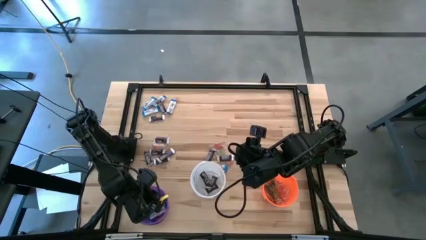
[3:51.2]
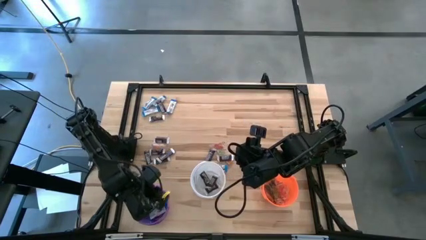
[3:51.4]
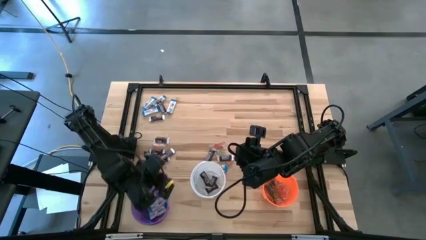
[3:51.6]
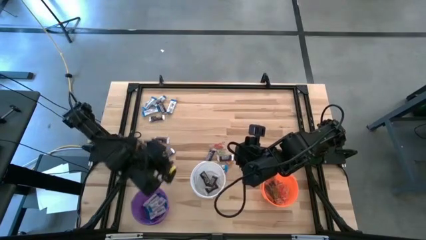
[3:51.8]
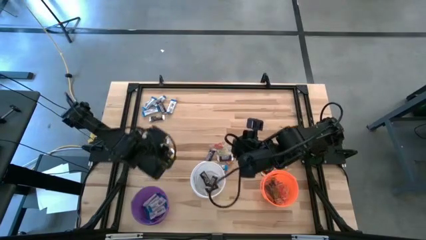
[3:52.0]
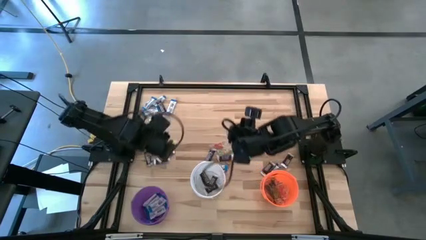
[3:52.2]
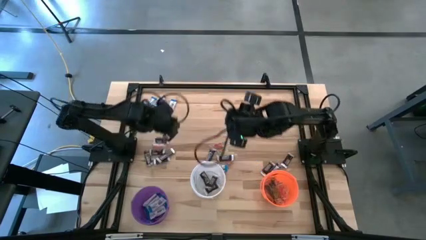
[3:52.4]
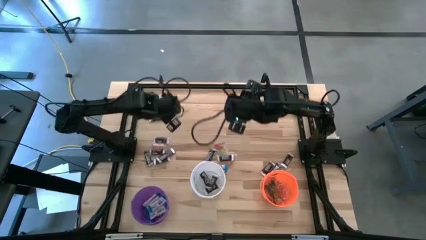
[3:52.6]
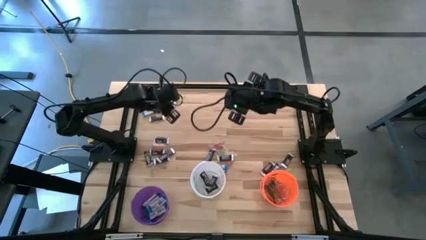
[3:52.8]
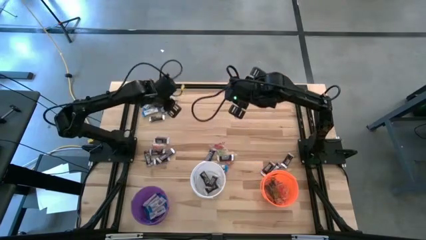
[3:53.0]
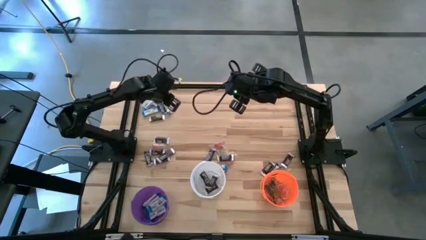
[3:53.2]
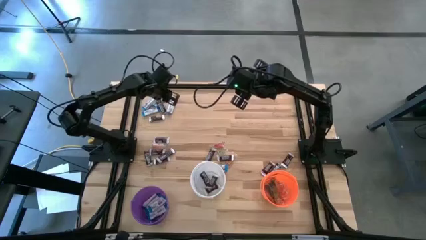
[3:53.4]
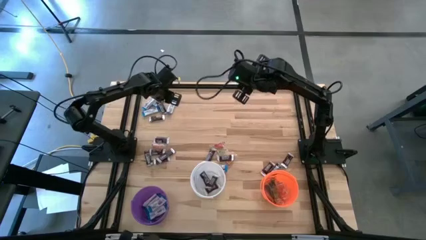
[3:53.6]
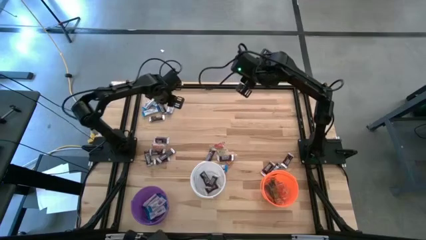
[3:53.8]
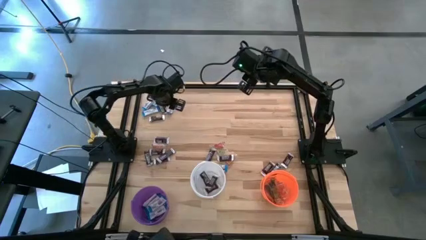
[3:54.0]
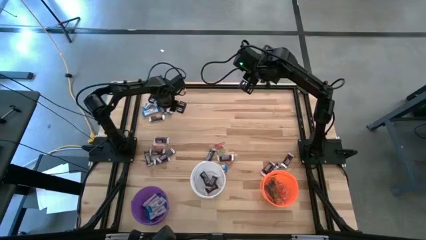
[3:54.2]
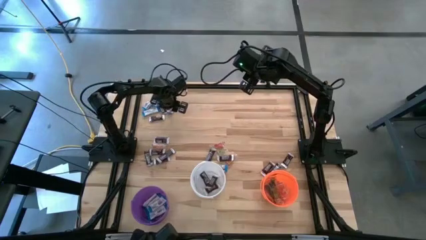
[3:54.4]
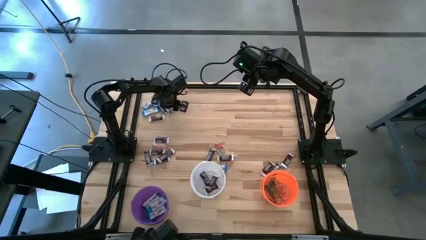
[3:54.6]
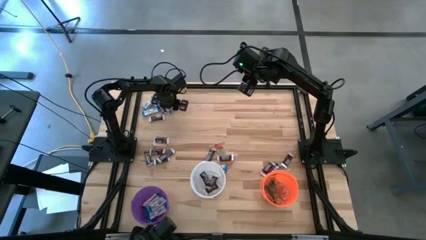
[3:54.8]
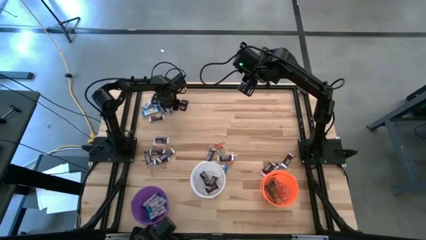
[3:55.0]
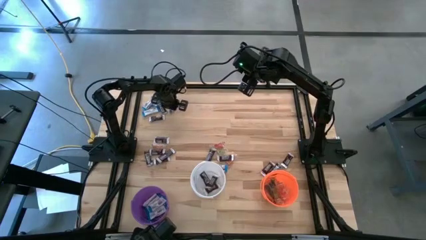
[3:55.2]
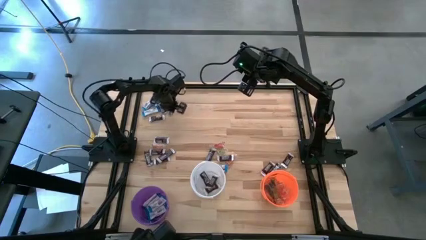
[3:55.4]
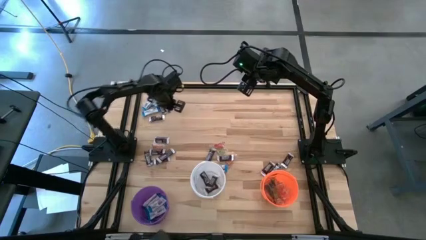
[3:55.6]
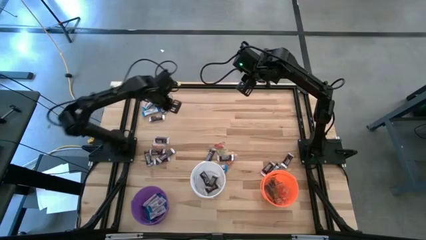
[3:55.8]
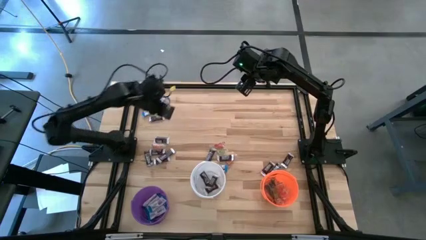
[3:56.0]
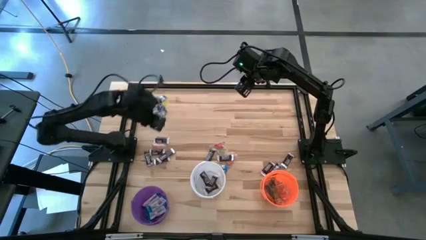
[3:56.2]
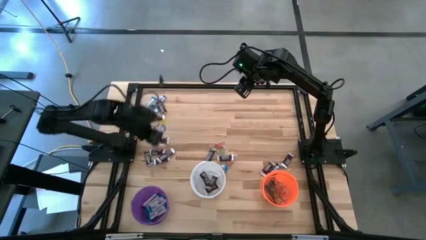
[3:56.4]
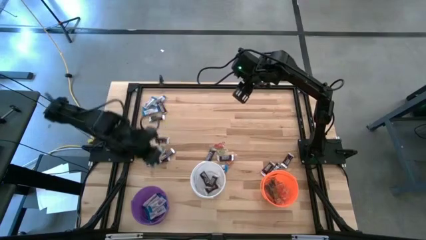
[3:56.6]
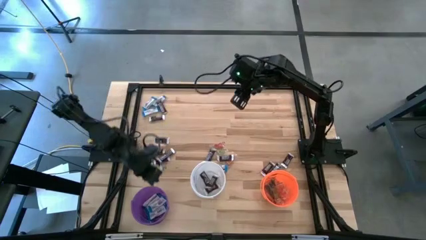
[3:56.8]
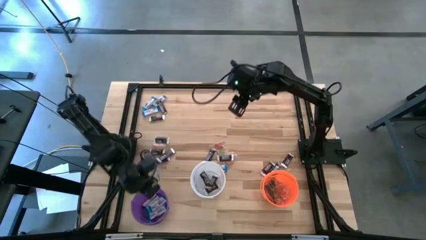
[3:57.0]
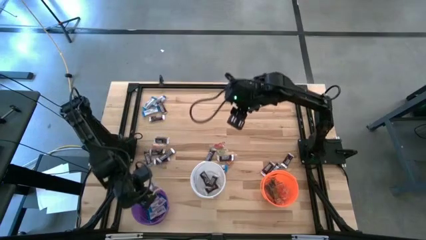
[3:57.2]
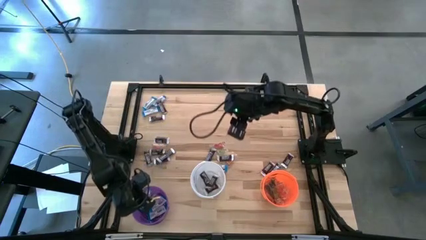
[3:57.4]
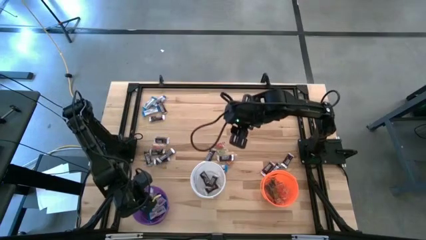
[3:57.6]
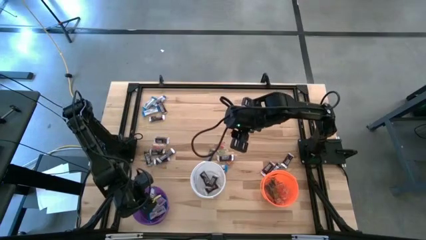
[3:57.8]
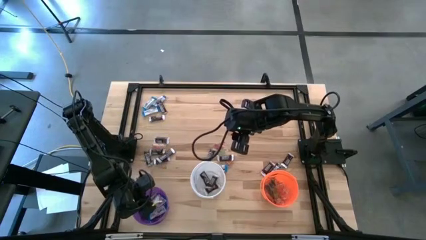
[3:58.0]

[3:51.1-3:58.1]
Task: Sort candy
Put the white chocolate into the violet bucket

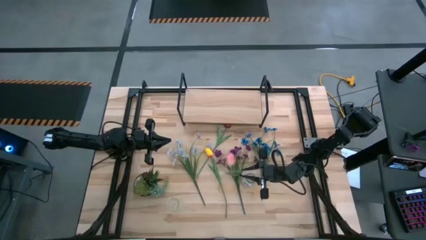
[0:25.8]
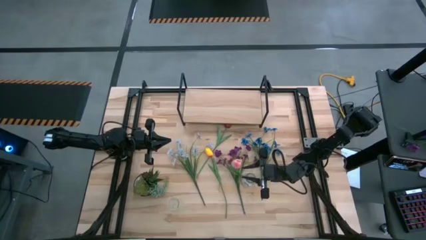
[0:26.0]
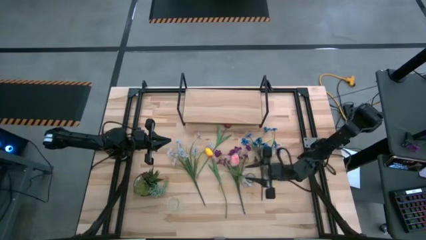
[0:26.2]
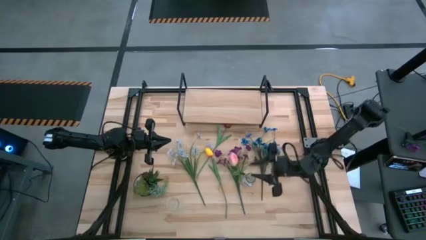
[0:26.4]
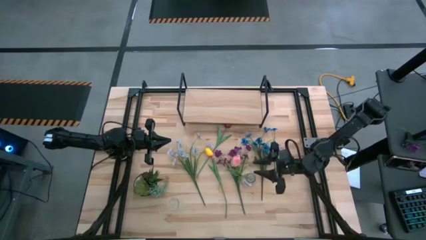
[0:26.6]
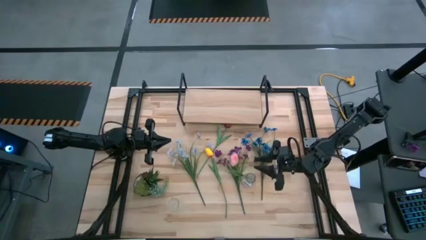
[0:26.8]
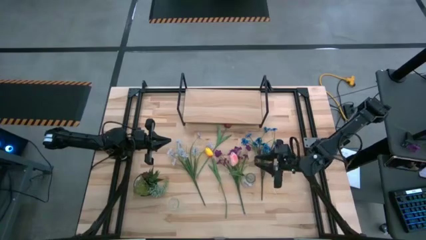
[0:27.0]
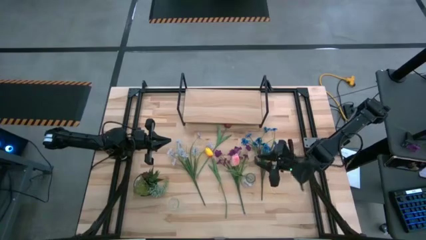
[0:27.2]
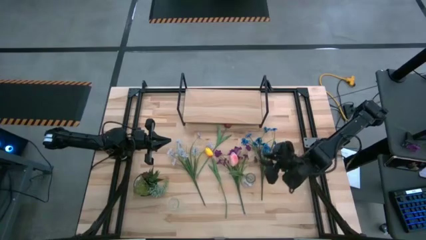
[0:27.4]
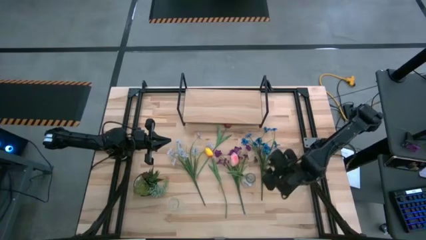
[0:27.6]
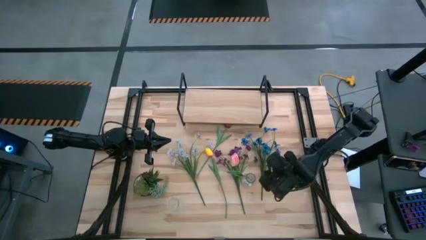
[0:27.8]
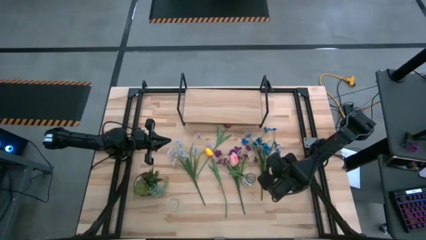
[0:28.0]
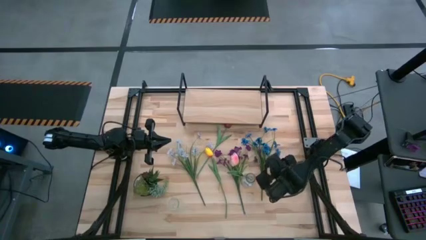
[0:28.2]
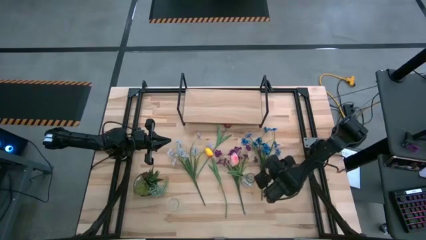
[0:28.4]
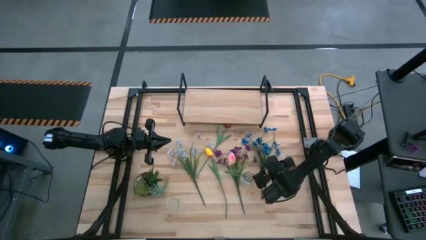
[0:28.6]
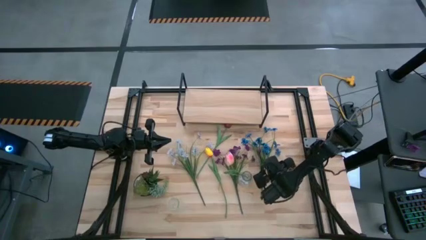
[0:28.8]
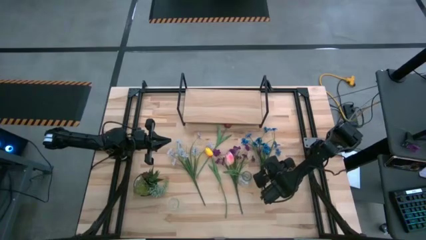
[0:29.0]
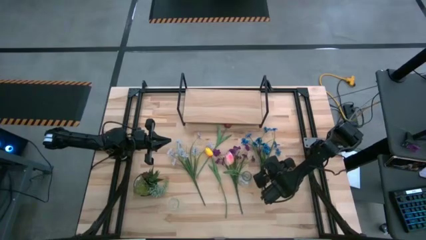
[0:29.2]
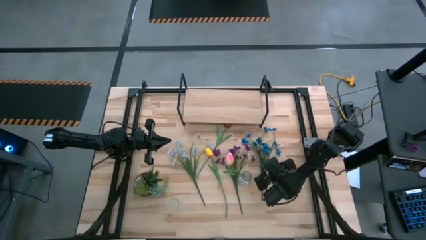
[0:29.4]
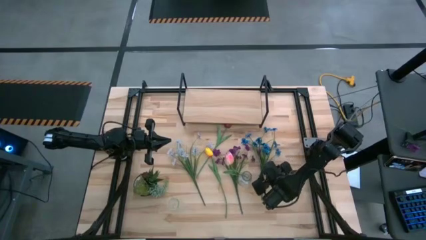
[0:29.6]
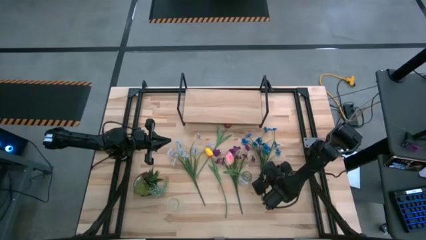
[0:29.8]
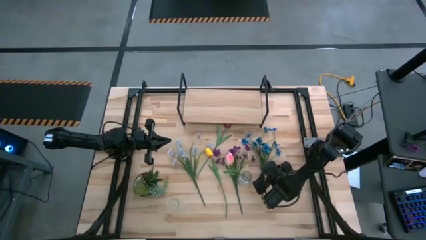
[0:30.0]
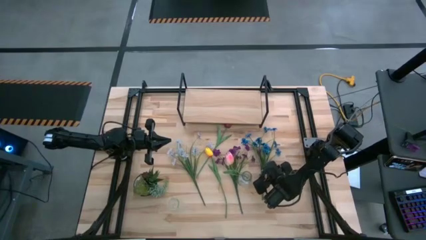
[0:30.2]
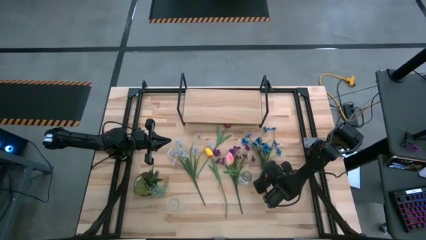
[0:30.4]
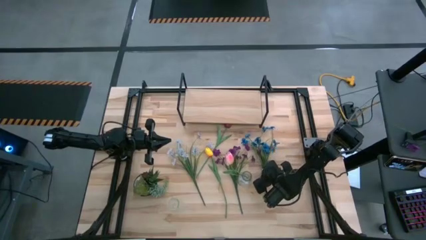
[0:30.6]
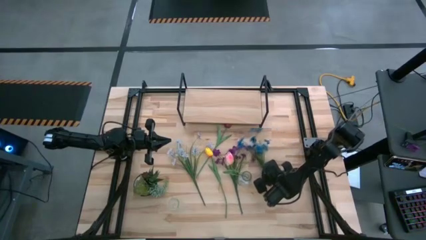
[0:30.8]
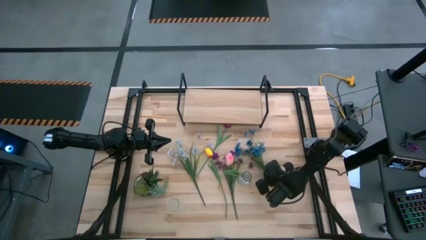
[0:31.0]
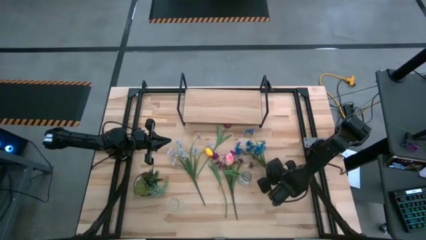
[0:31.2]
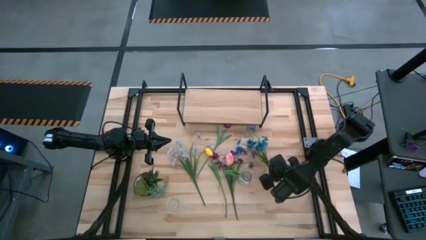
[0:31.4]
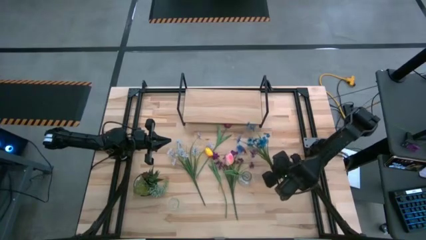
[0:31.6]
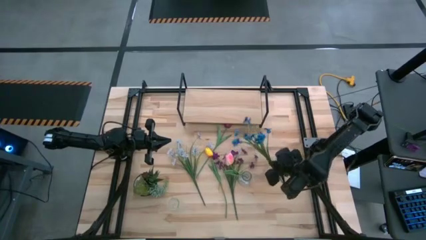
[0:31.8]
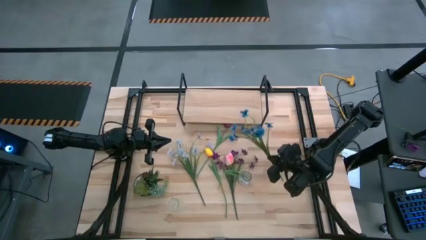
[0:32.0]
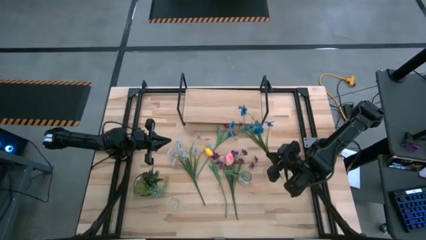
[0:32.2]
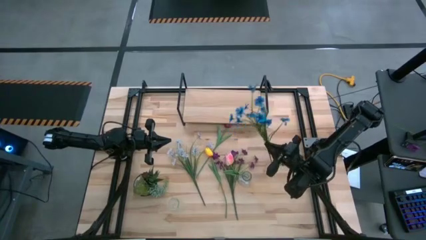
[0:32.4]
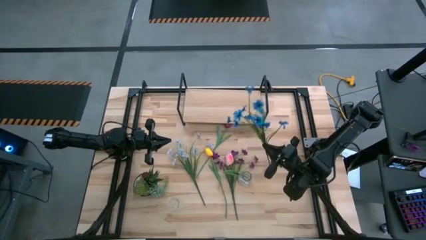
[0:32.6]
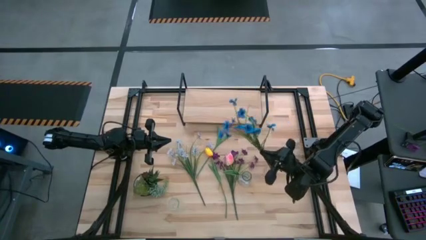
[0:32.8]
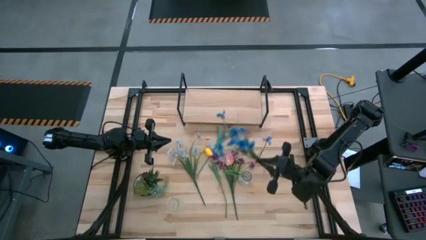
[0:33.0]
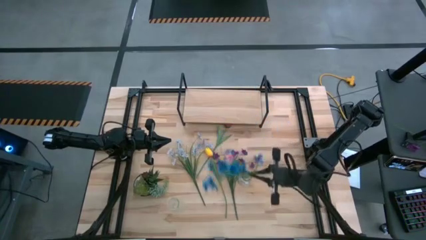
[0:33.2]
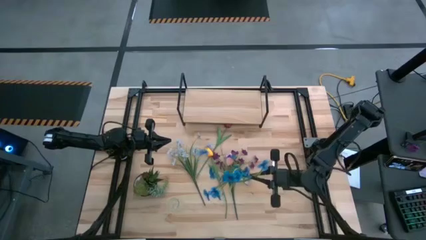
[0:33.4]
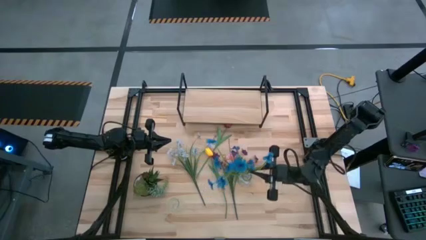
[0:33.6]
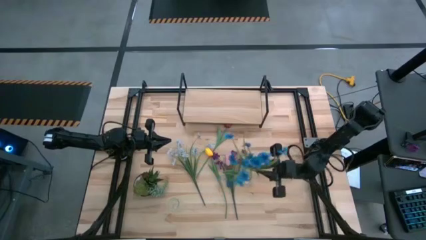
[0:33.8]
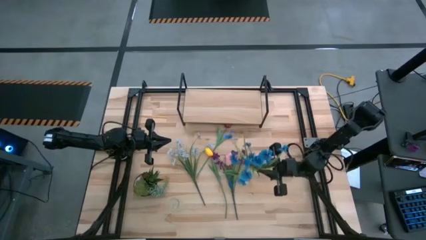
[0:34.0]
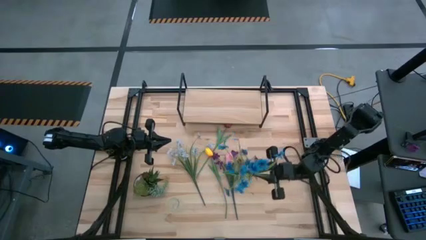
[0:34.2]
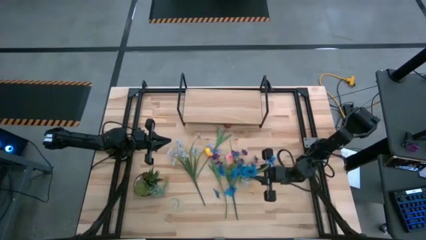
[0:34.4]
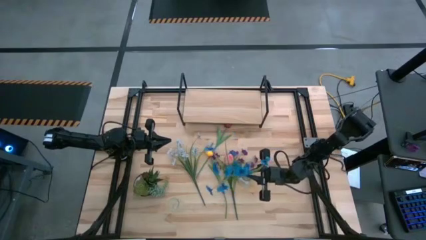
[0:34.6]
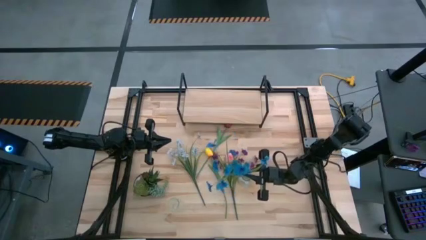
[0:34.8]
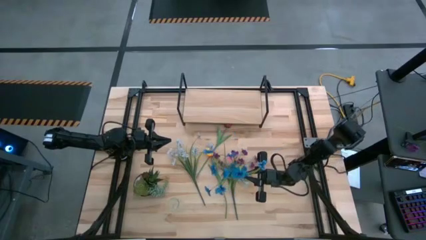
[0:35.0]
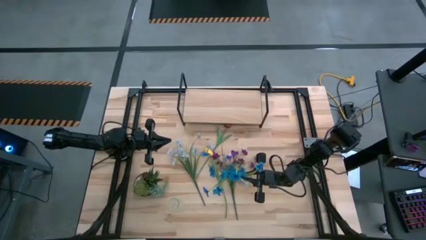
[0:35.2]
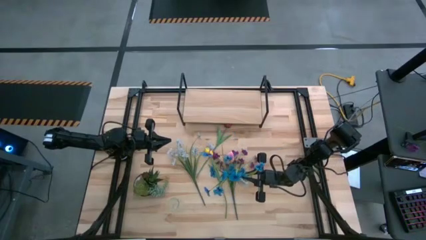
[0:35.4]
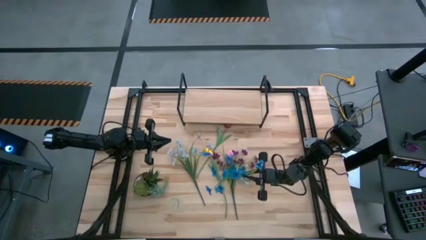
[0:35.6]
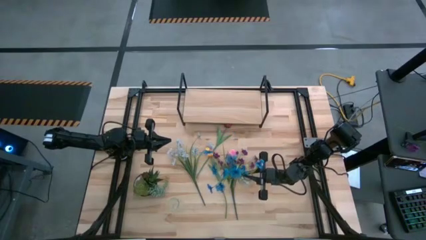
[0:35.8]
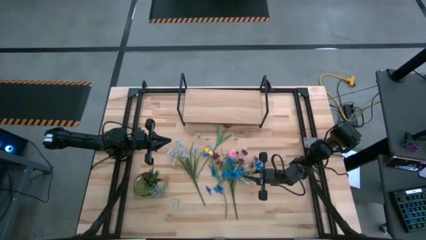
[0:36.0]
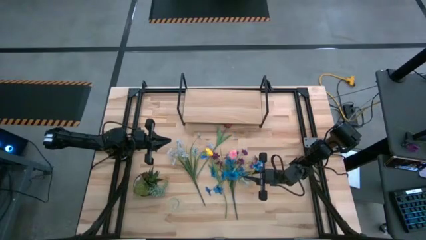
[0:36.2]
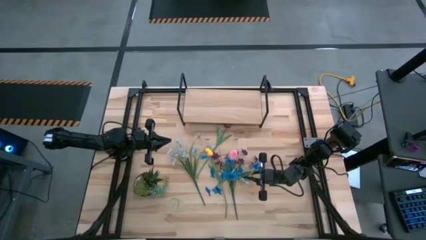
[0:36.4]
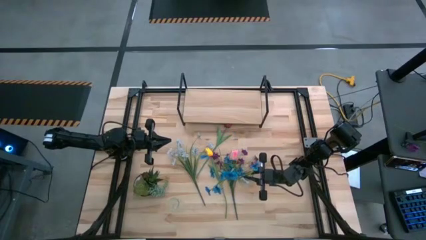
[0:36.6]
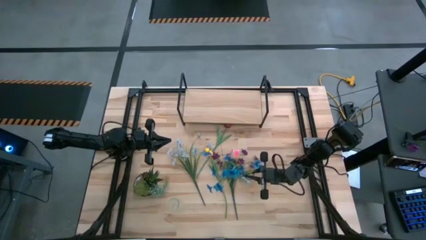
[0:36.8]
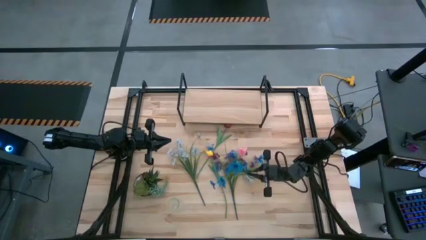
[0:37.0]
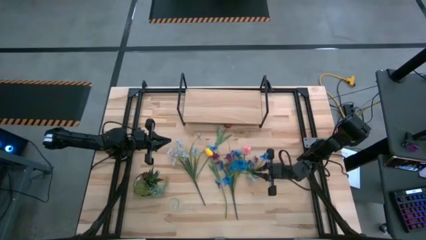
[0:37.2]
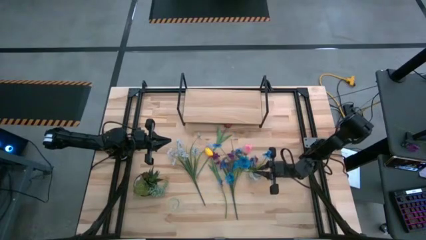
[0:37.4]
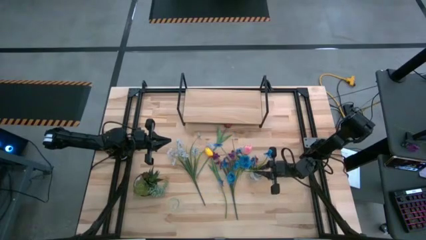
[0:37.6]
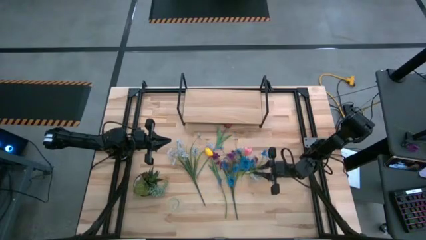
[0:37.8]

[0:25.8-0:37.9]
Task: Pick and place flowers into a vace then onto a shelf
Put the blue flowers into the right transparent vase
